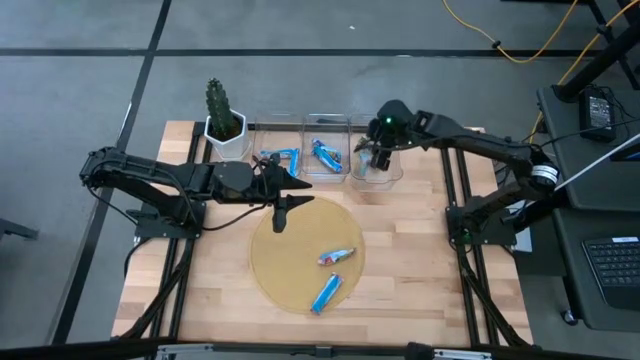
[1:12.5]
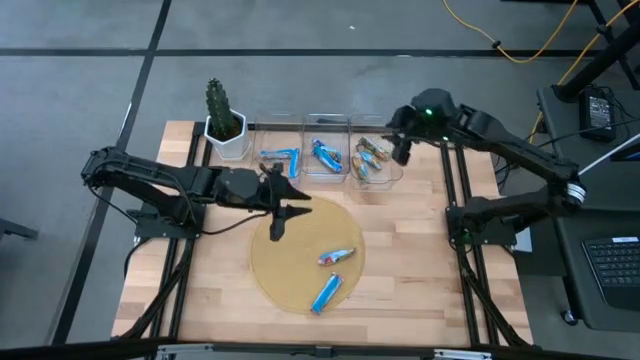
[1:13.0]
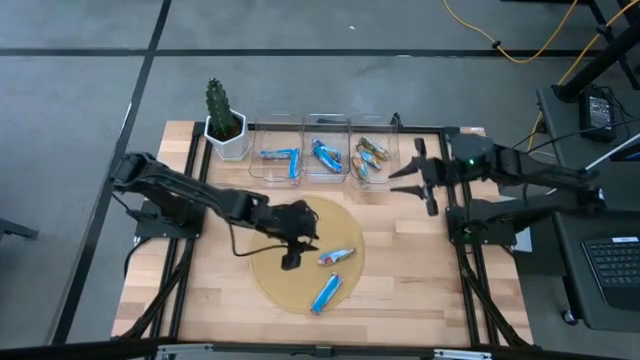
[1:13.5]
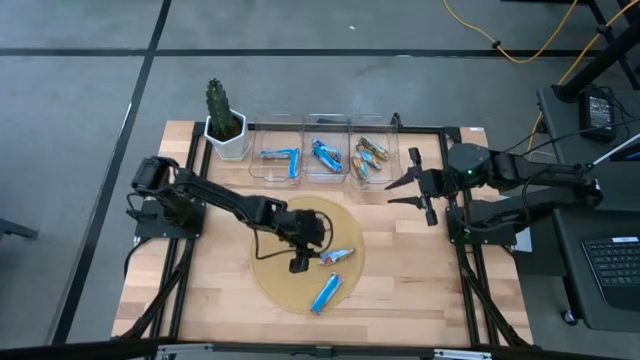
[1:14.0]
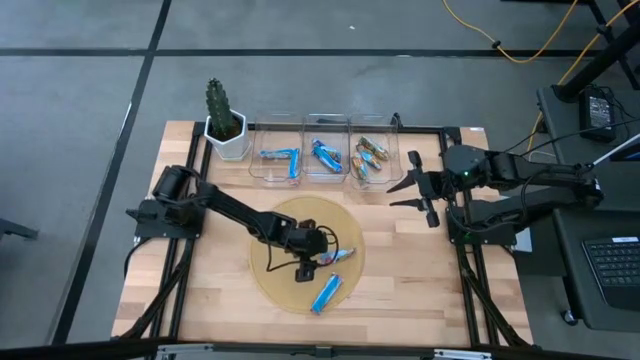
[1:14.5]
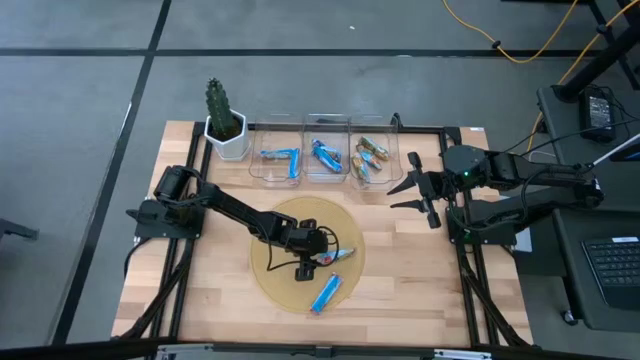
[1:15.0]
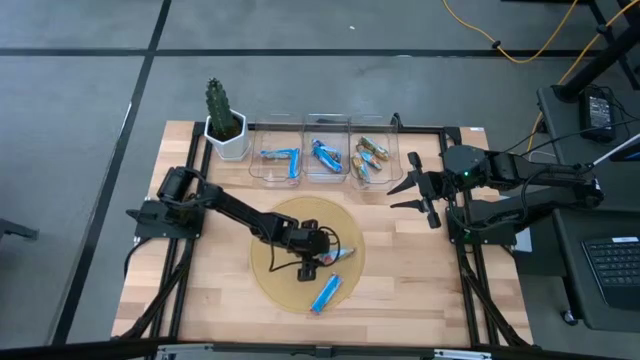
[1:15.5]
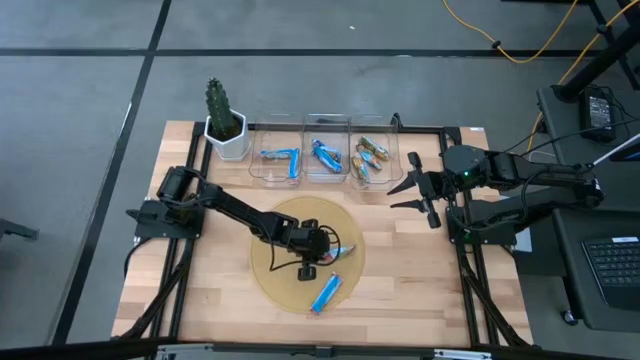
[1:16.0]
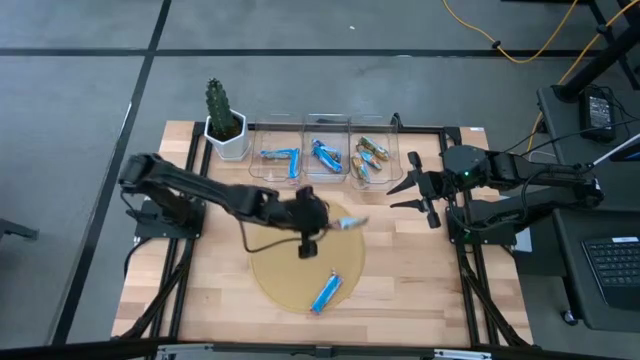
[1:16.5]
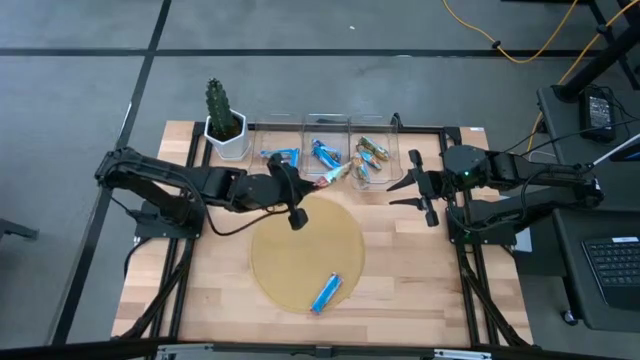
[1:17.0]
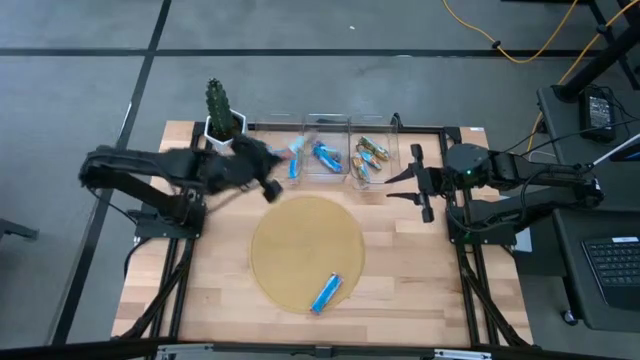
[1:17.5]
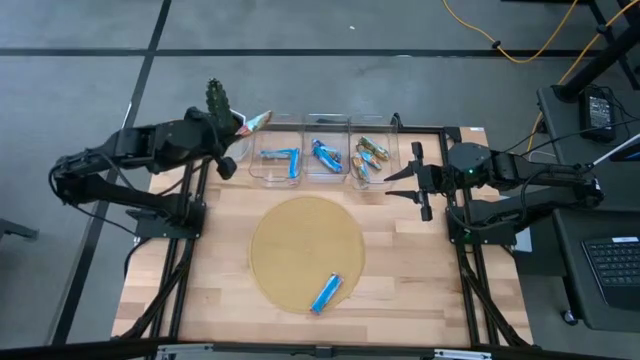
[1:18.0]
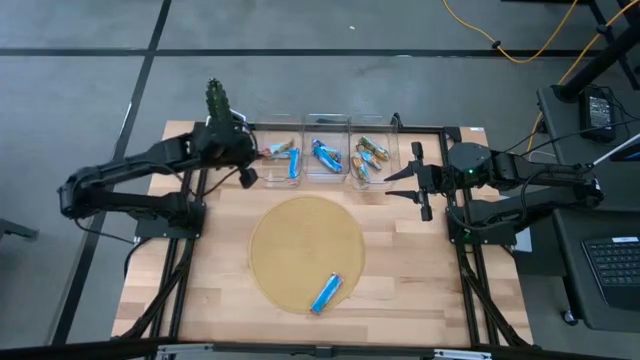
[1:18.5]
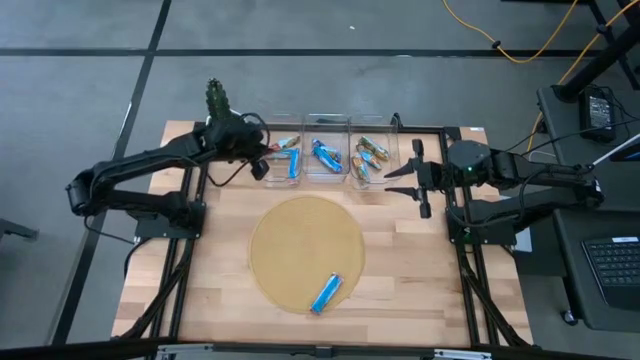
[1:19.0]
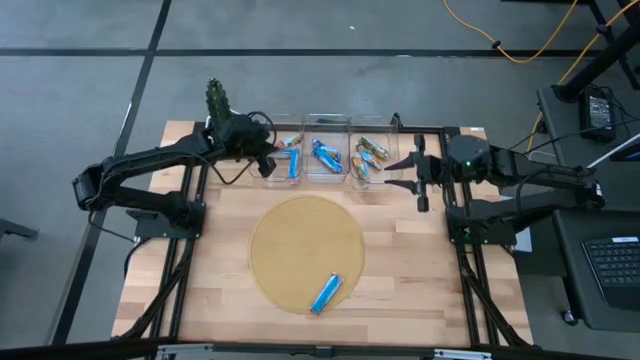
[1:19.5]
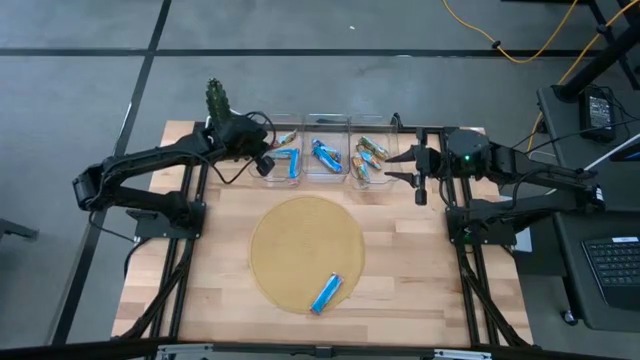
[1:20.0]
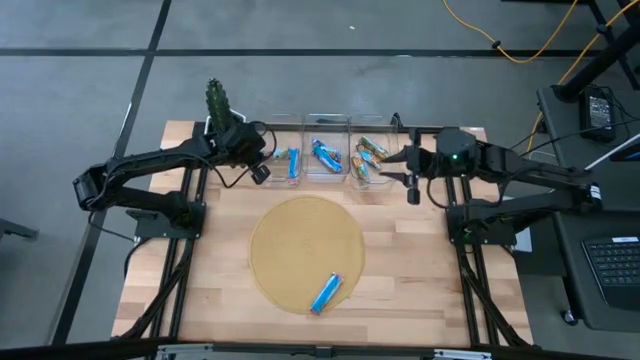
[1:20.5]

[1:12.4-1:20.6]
Task: Pick and place Granola Bars by type
Put the red granola bar into the left transparent bin

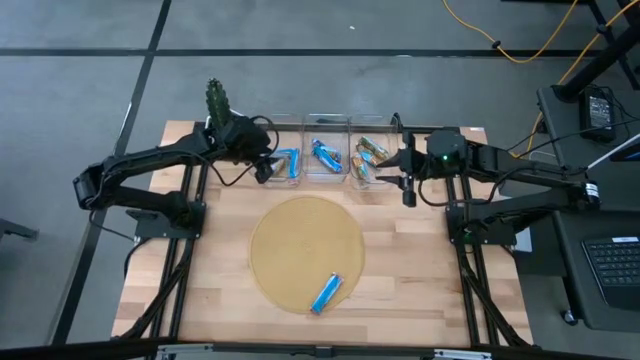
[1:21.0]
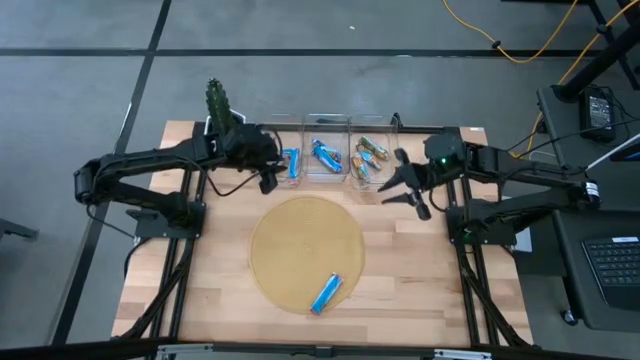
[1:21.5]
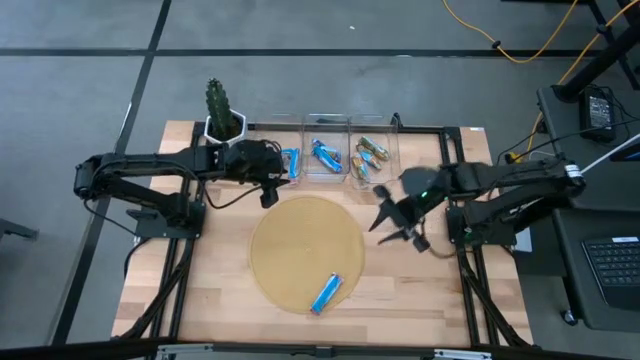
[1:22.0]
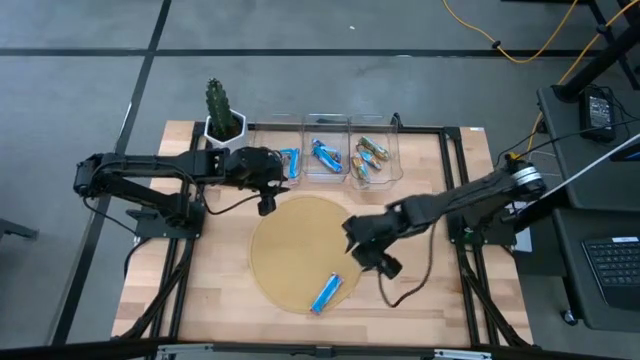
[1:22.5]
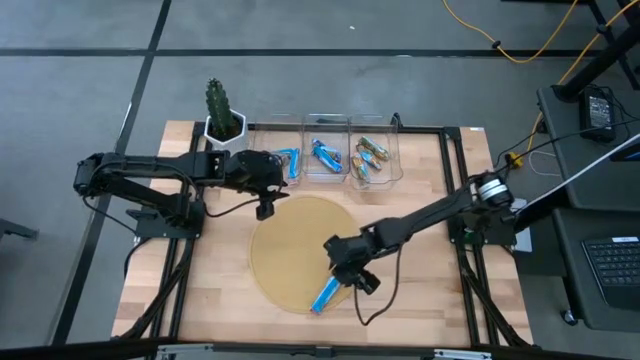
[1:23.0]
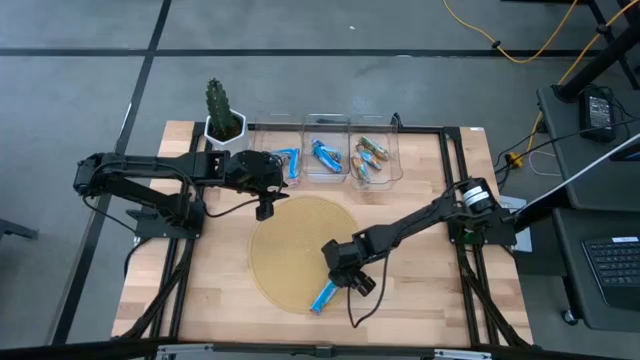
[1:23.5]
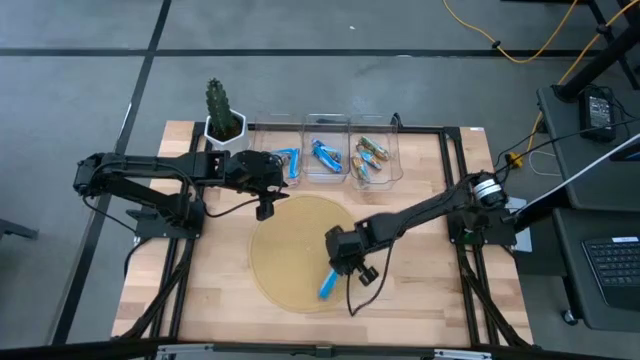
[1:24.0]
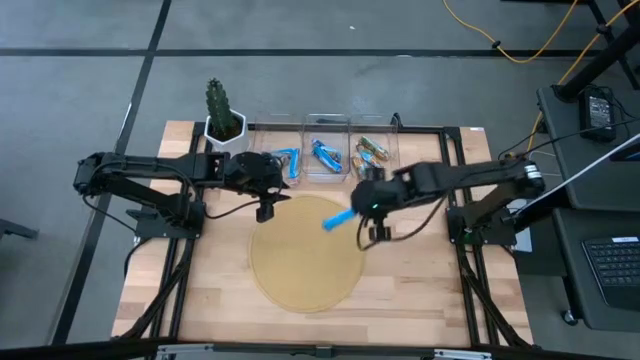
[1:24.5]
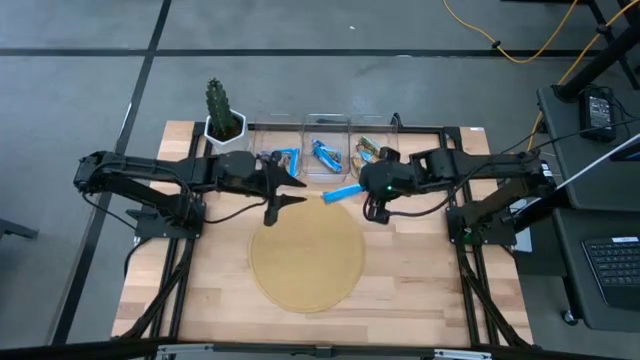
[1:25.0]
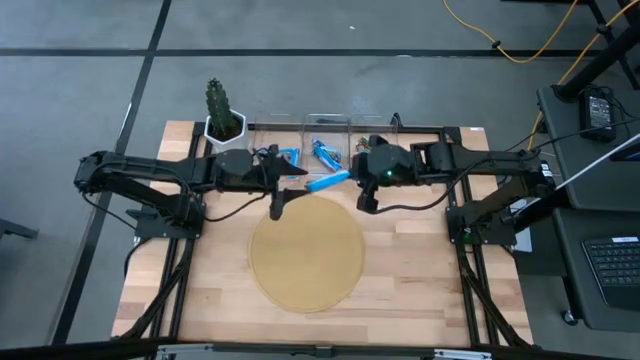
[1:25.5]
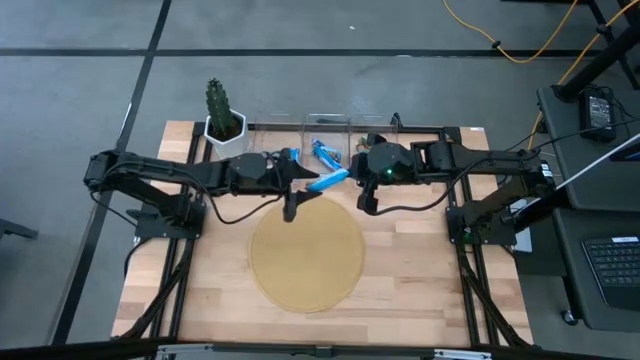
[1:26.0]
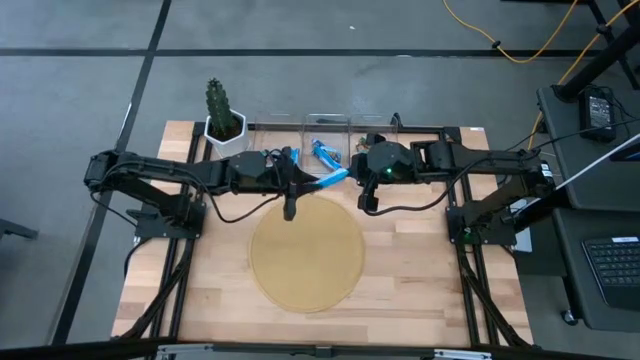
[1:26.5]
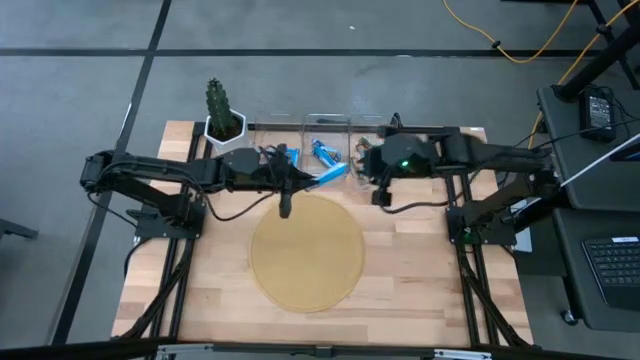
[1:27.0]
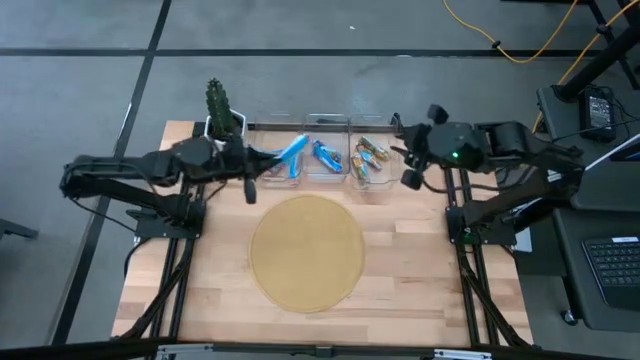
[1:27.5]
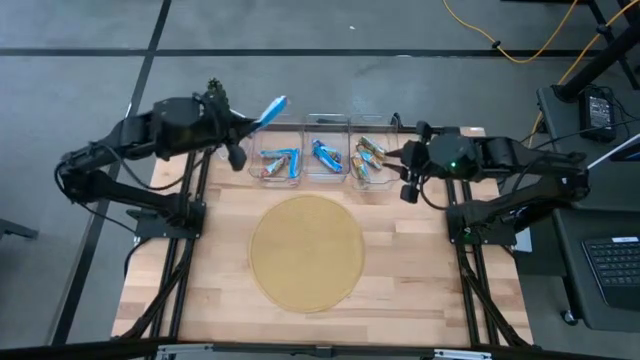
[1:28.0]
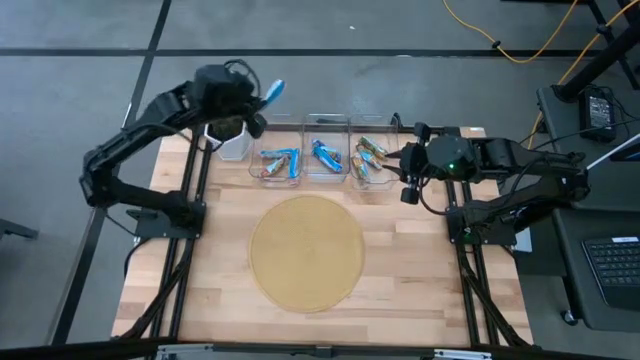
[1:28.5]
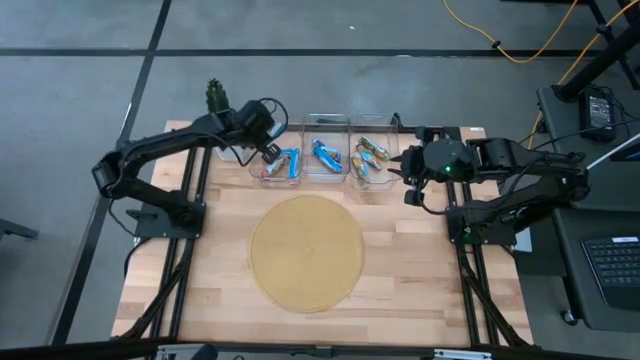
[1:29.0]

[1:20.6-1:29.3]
Put the red granola bar into the left transparent bin
